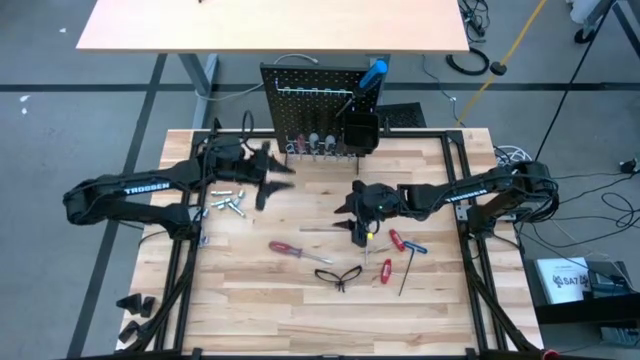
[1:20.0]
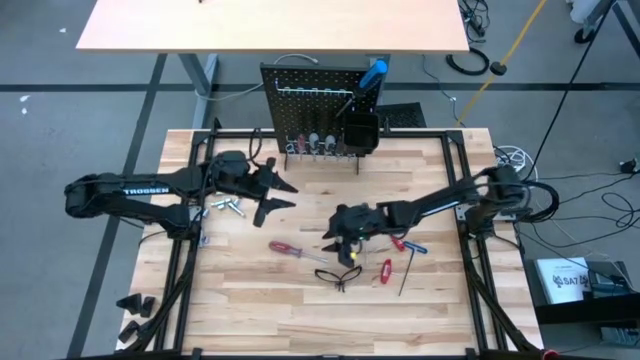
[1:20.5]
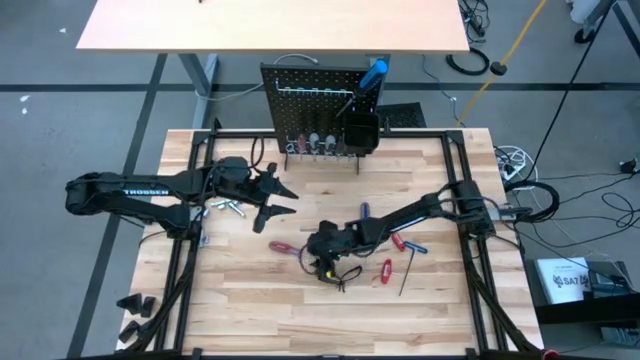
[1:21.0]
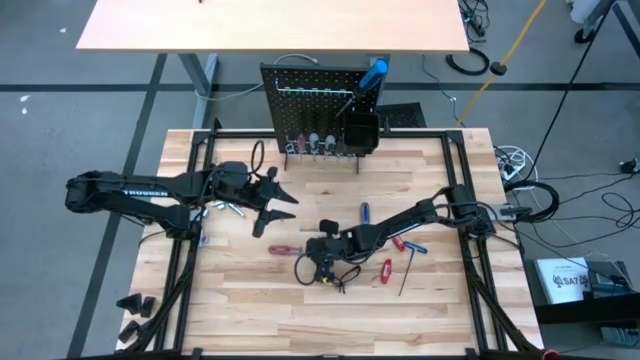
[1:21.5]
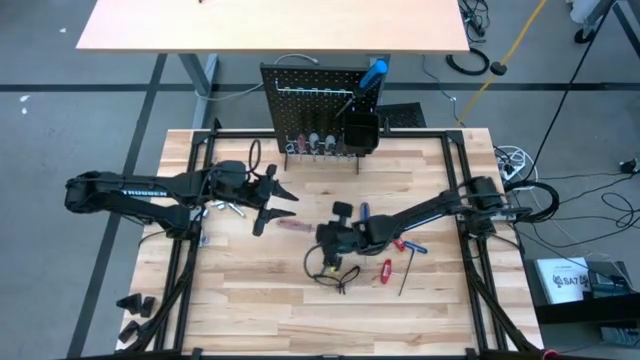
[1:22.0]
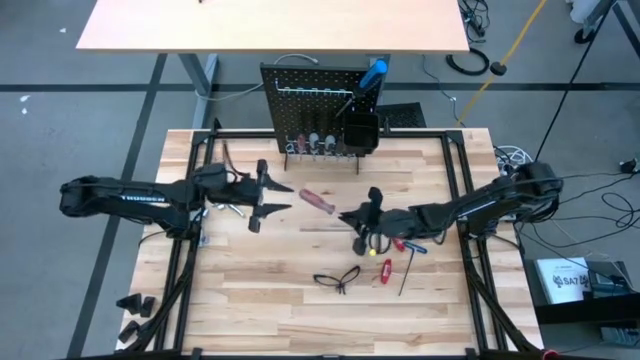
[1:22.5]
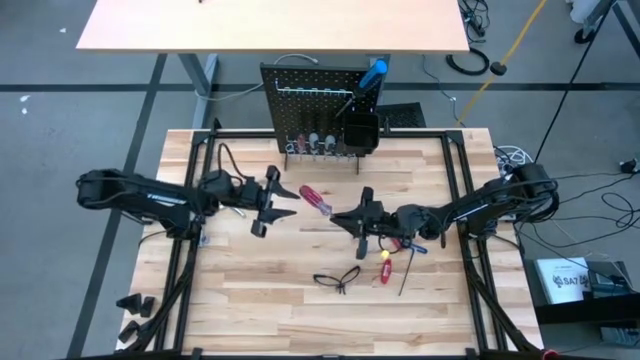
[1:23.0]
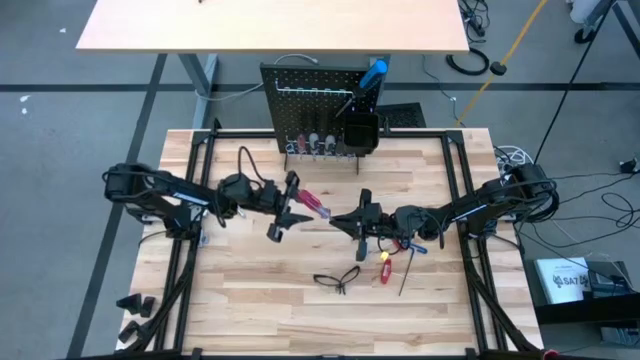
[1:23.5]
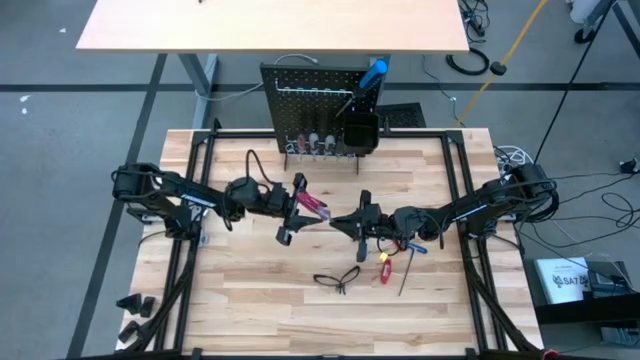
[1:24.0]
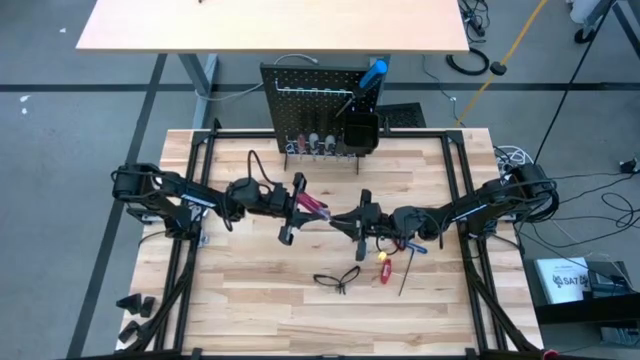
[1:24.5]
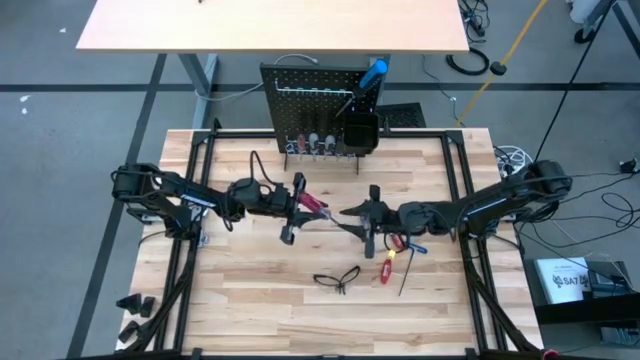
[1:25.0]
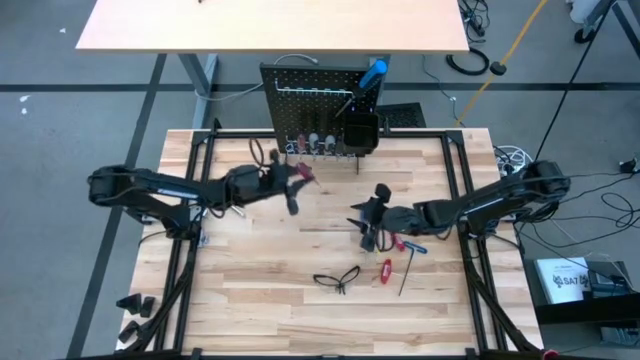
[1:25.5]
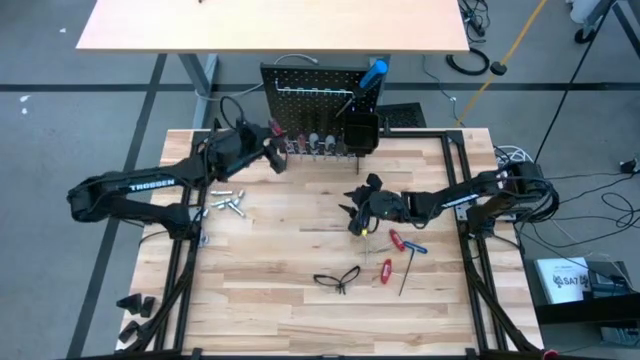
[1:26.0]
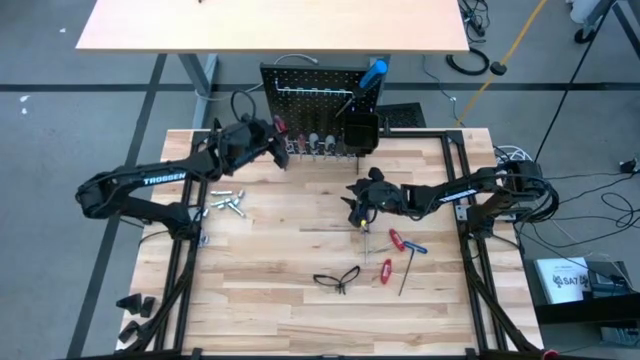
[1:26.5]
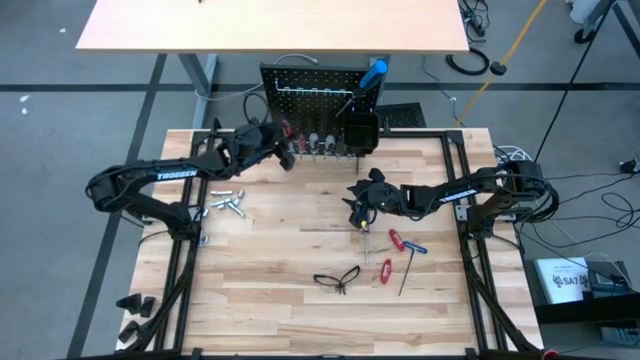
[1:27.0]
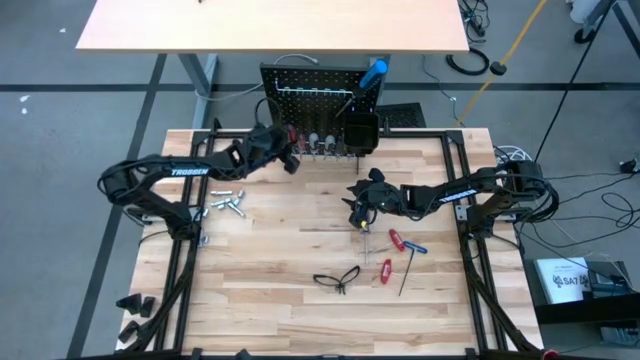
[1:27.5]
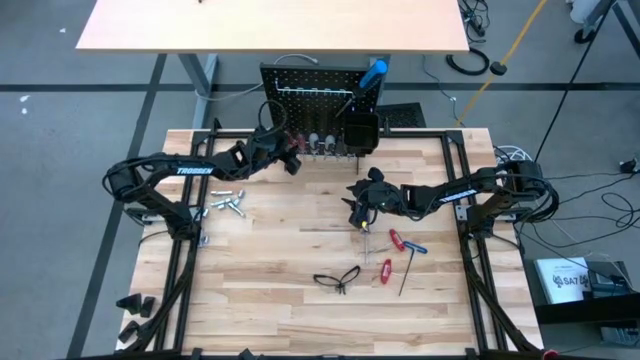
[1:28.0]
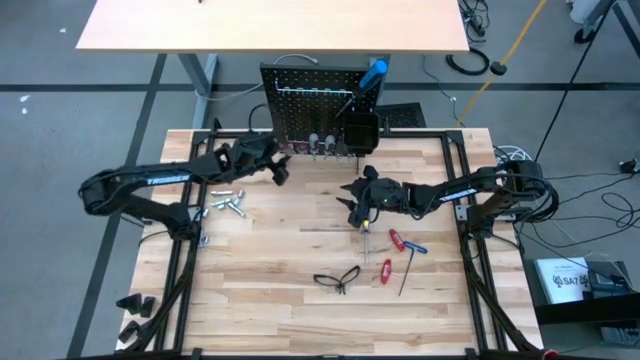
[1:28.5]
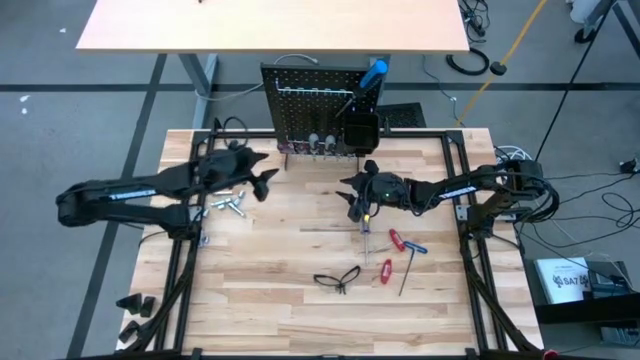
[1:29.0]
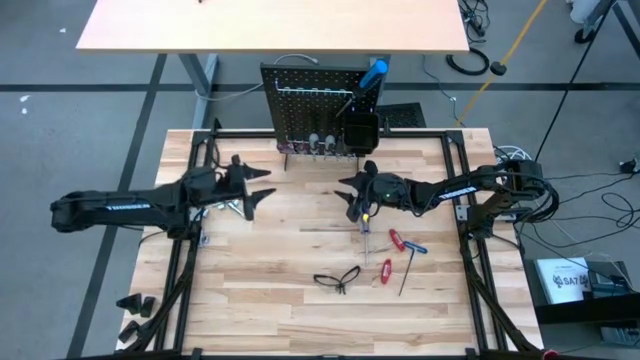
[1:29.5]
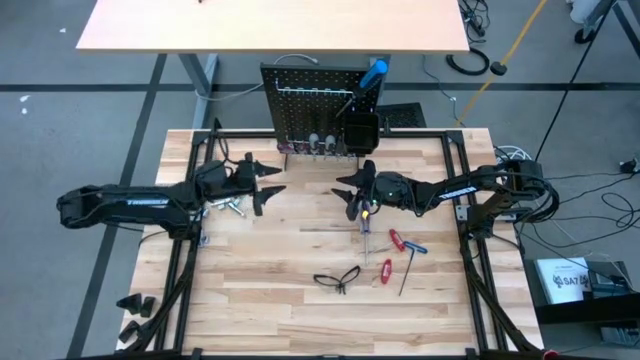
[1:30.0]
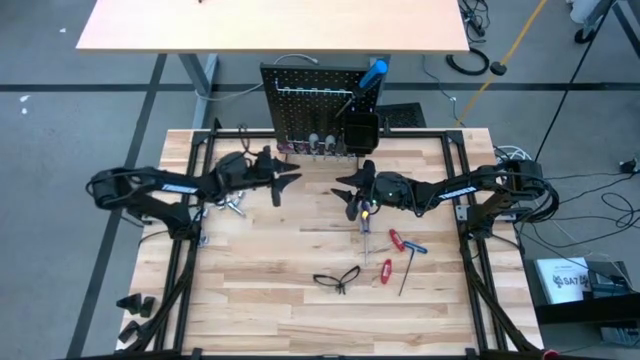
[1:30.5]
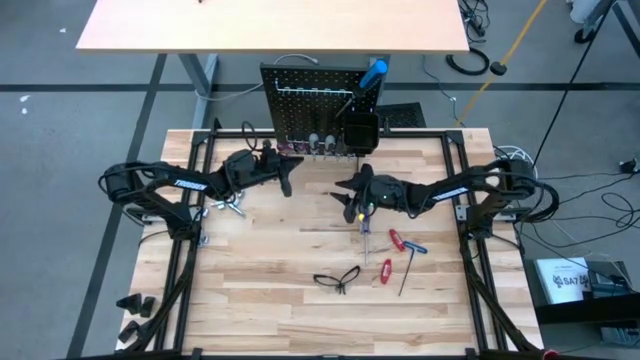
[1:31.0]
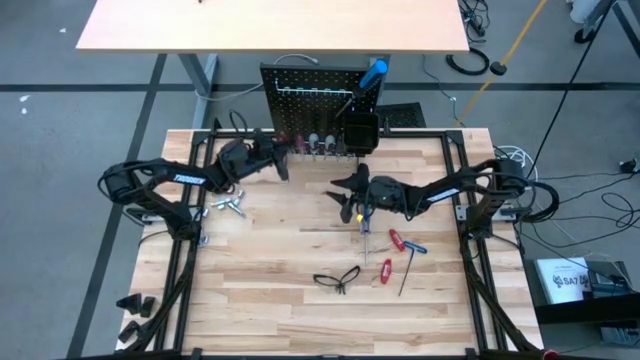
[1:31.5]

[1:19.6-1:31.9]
Task: Hang tools onto peg board
Hang the red screwdriver onto the peg board

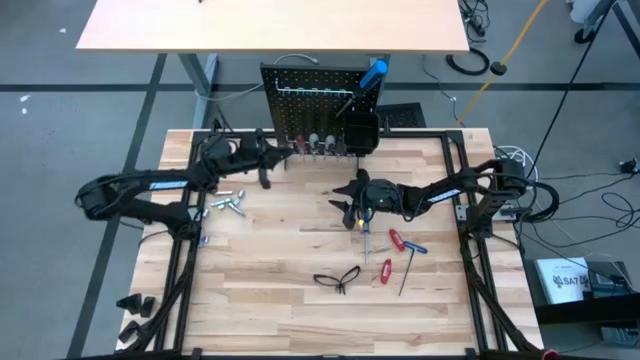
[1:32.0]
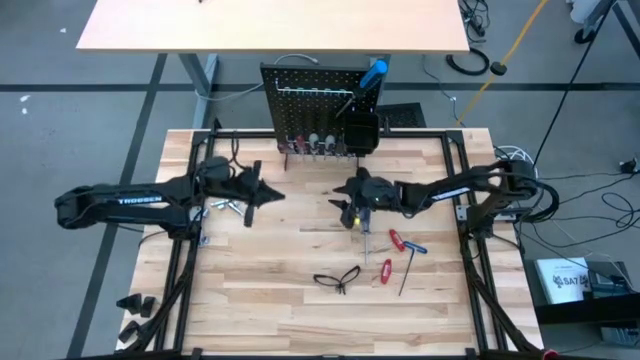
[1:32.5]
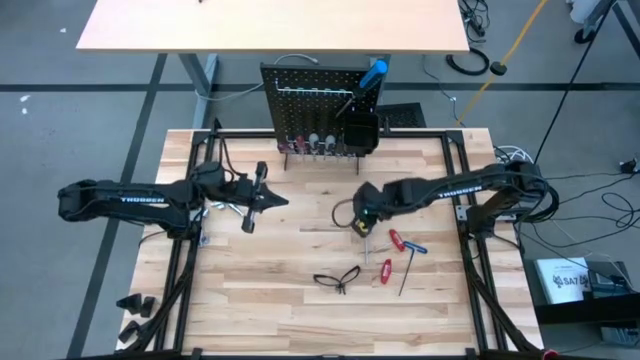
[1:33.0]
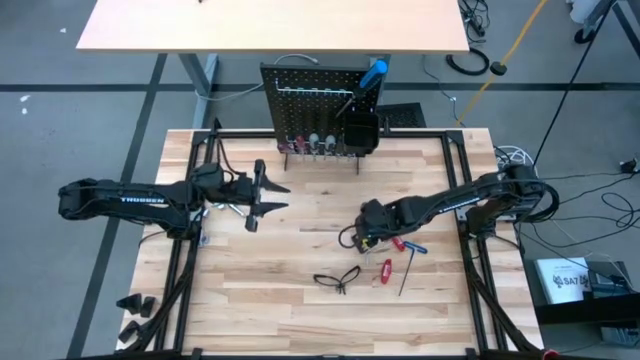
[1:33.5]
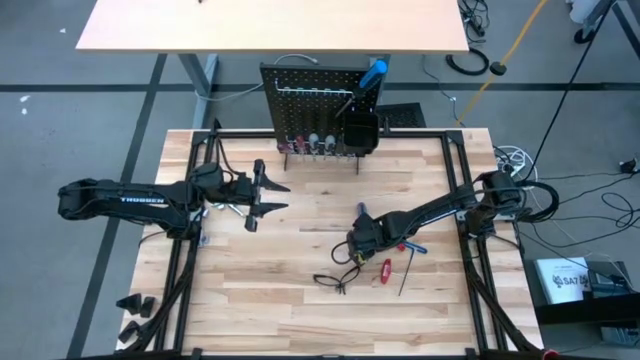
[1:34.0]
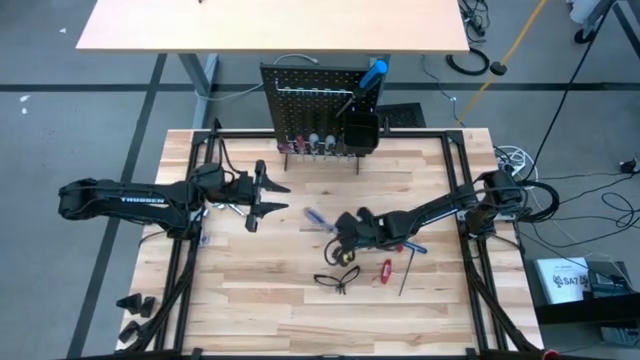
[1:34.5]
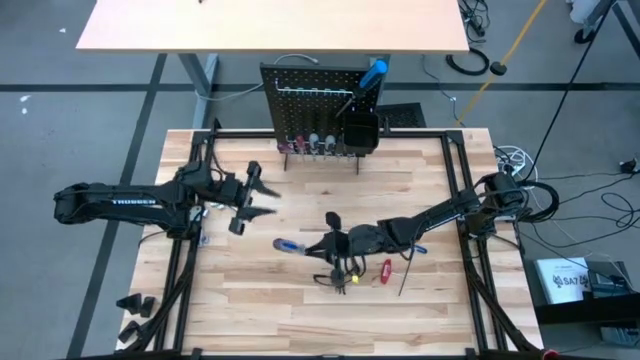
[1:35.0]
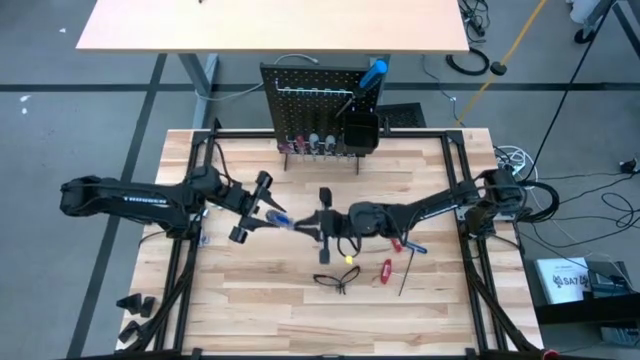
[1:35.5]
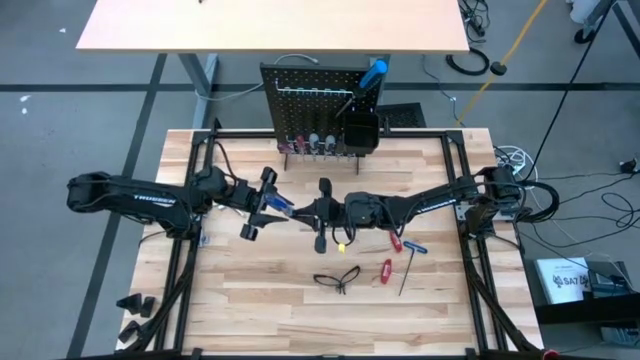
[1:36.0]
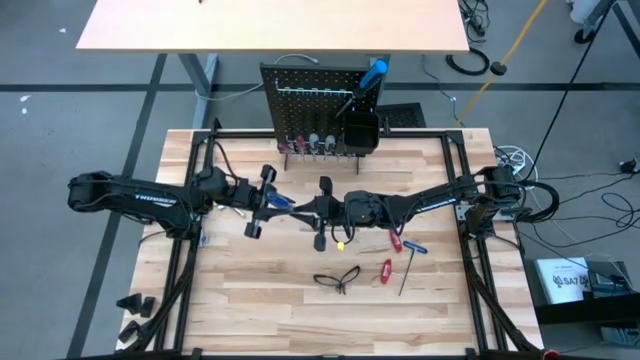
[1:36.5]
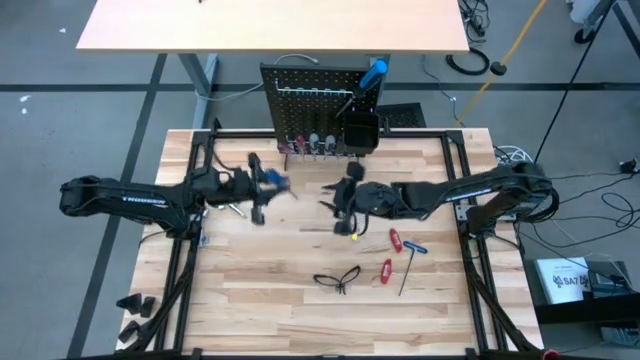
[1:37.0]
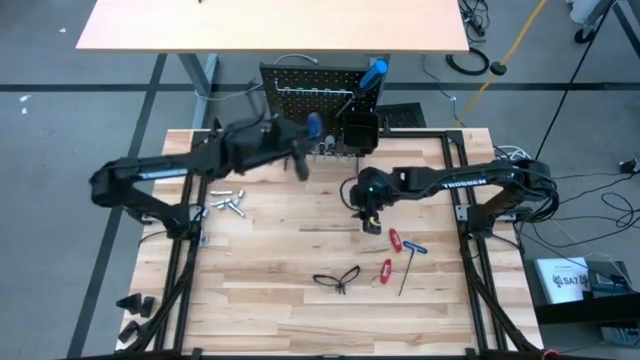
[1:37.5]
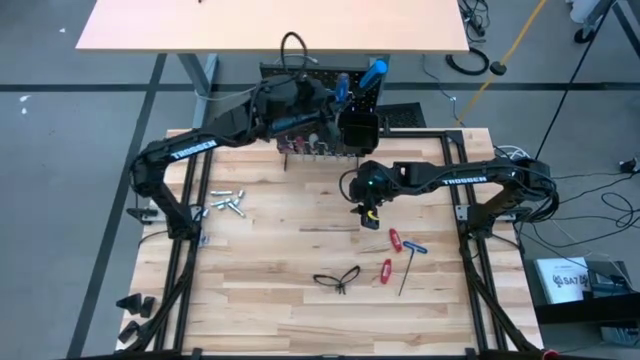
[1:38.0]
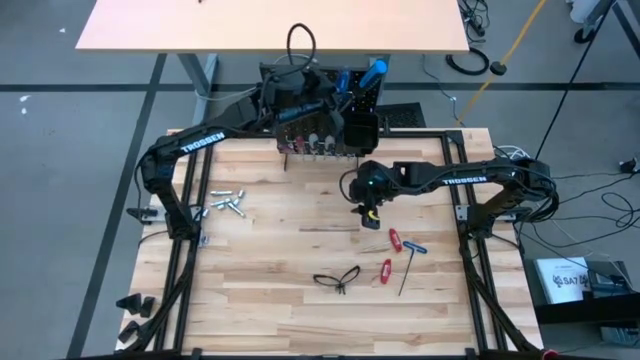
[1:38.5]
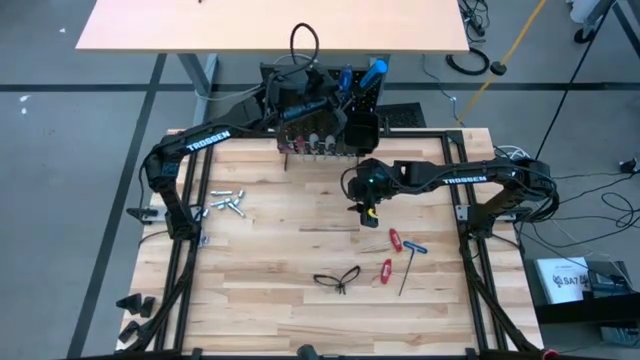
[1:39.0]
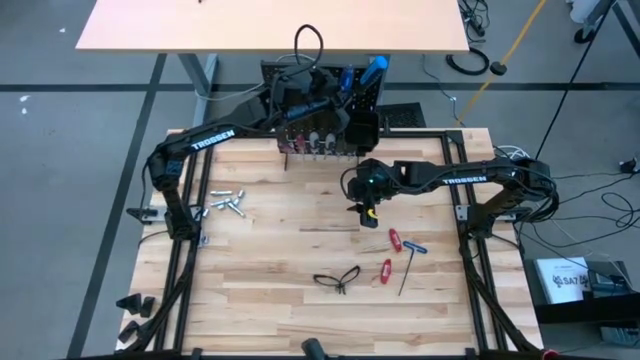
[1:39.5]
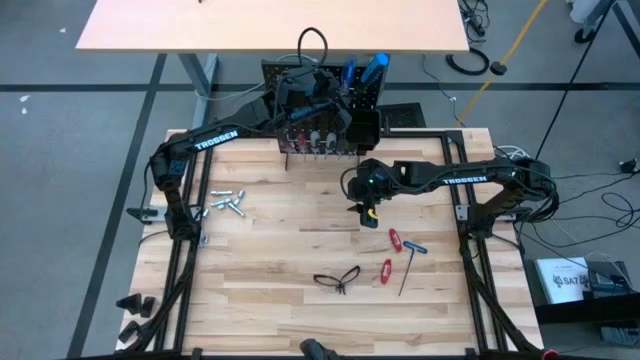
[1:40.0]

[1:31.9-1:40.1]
Hang the blue screwdriver onto the peg board

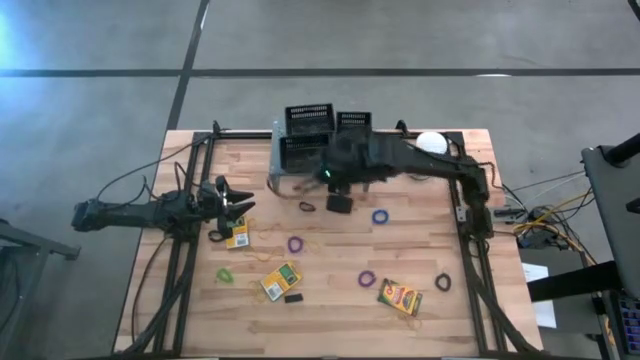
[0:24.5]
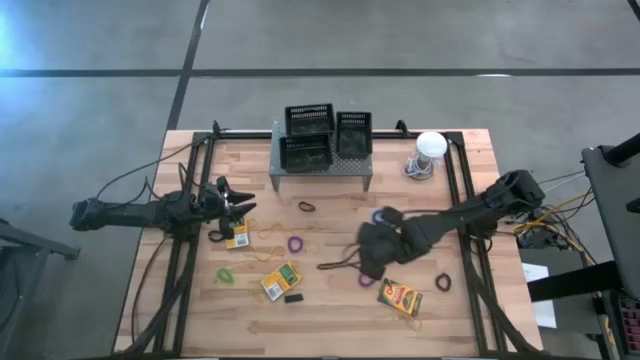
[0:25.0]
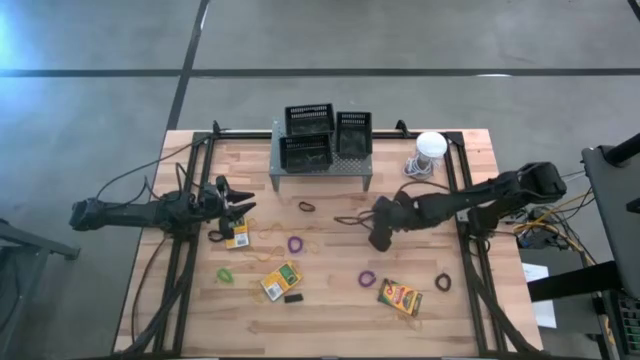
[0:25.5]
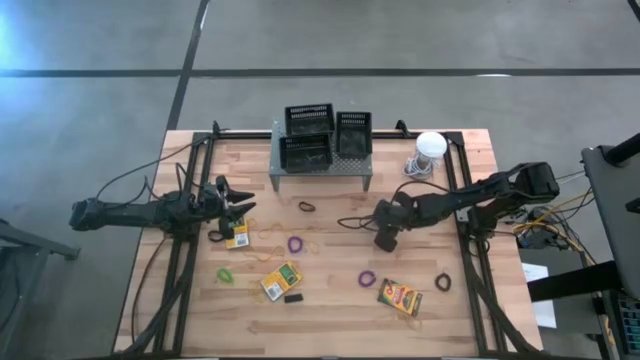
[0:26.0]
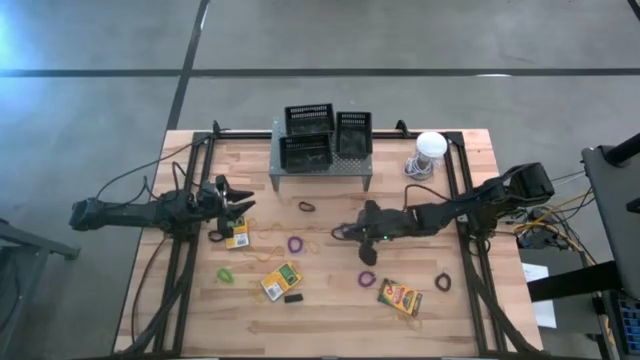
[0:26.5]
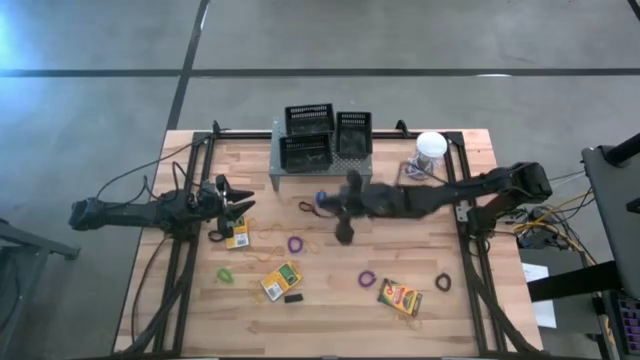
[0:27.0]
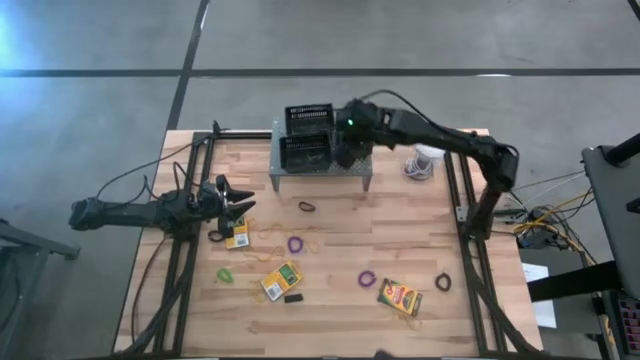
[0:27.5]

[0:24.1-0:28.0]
Task: Pick & Place Office Desk Supplies
Put the blue spring keychain into the right black bin
